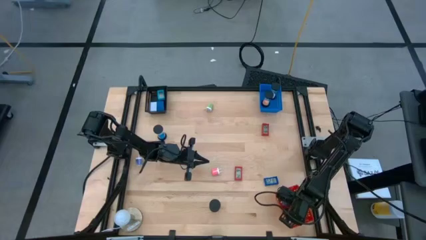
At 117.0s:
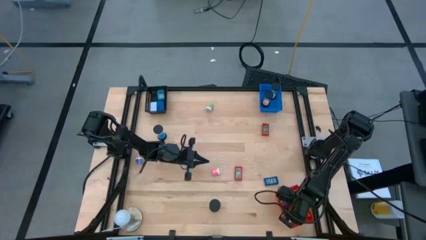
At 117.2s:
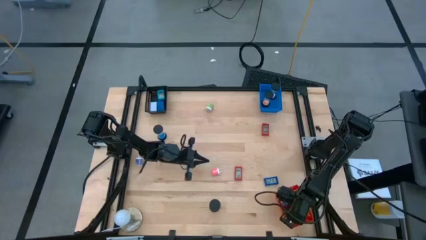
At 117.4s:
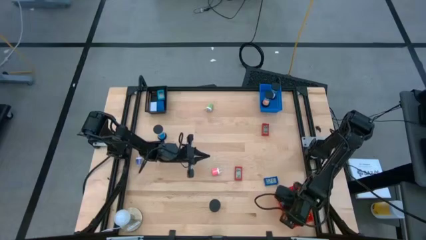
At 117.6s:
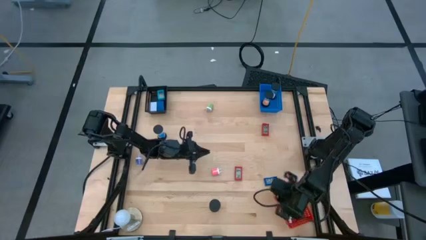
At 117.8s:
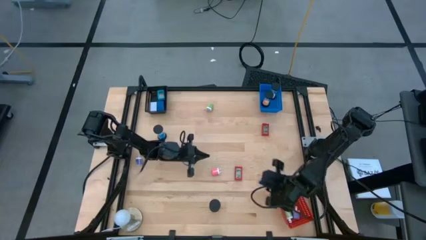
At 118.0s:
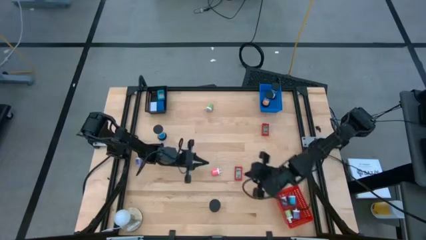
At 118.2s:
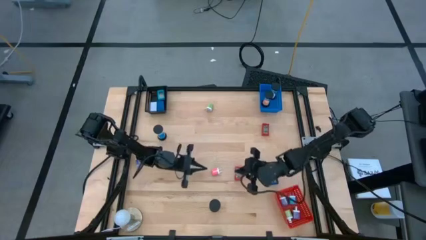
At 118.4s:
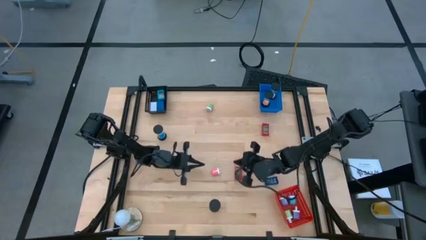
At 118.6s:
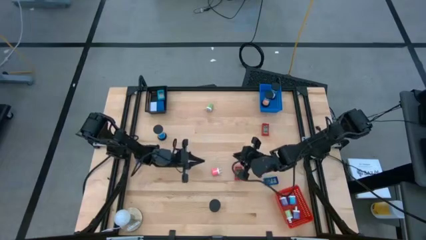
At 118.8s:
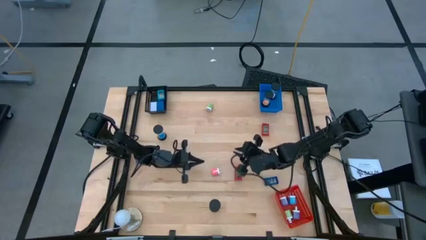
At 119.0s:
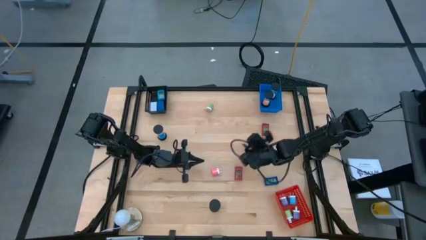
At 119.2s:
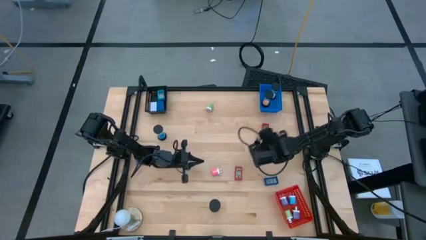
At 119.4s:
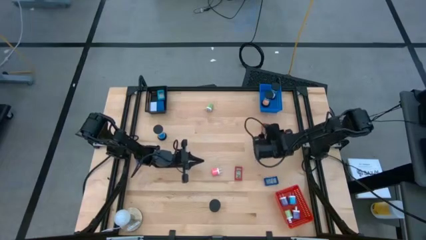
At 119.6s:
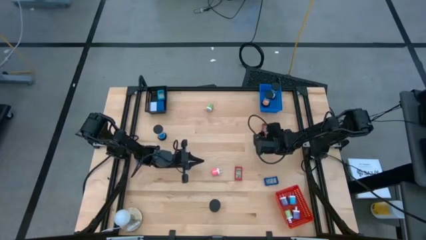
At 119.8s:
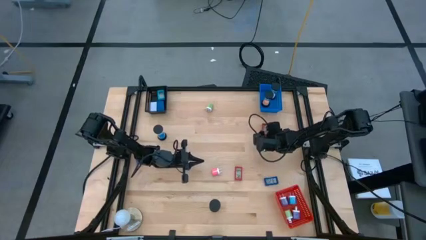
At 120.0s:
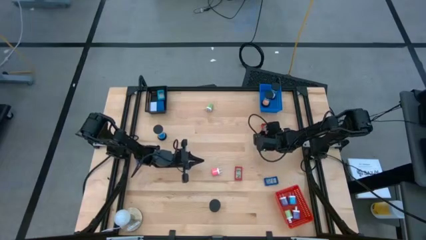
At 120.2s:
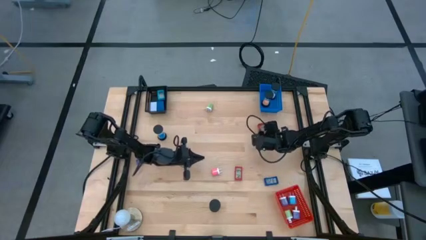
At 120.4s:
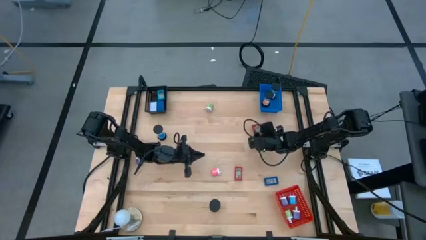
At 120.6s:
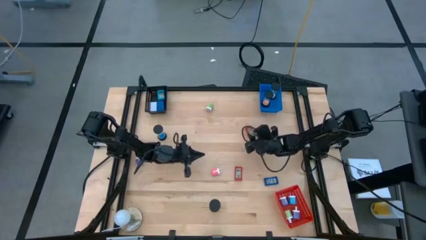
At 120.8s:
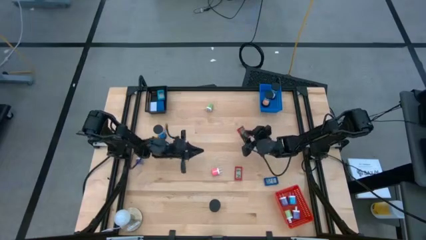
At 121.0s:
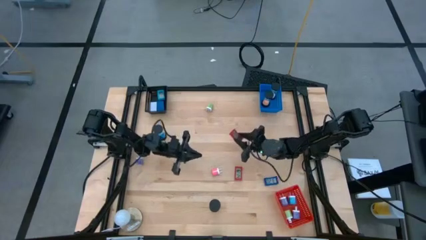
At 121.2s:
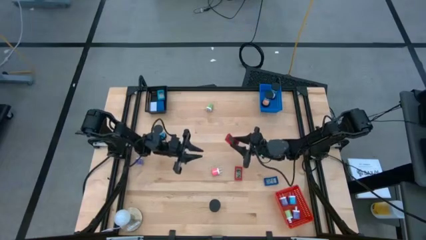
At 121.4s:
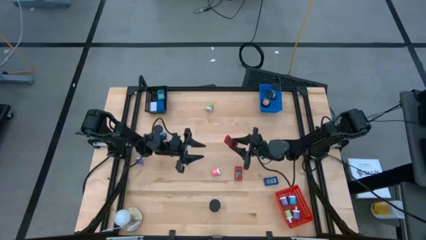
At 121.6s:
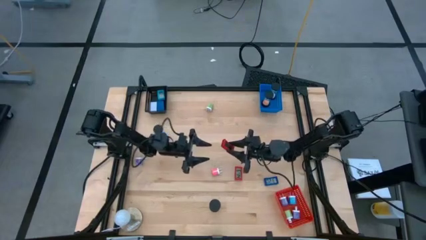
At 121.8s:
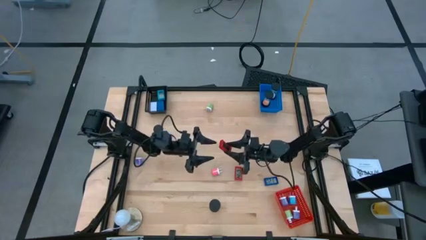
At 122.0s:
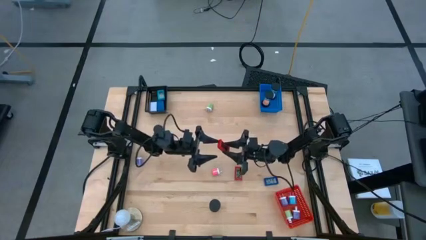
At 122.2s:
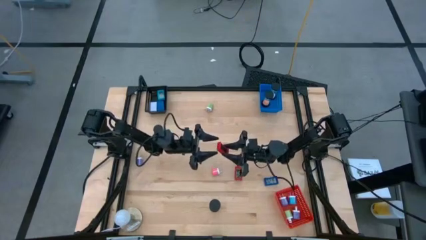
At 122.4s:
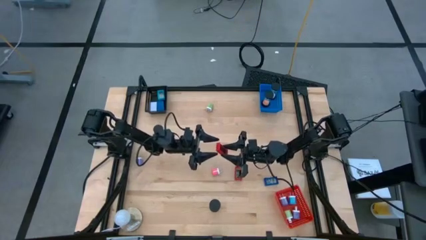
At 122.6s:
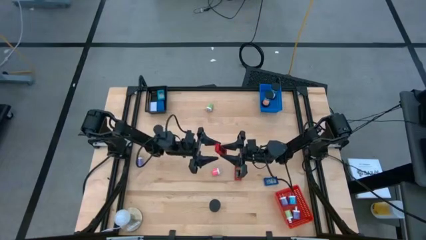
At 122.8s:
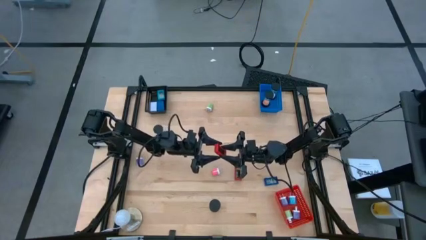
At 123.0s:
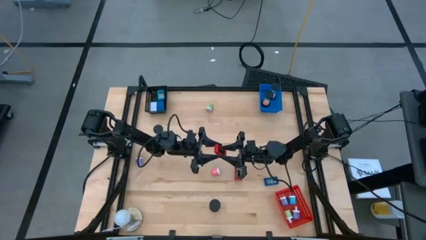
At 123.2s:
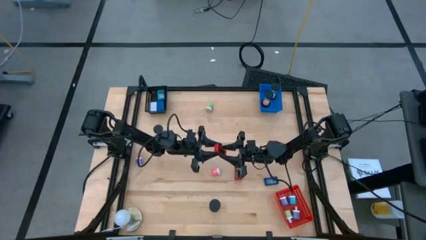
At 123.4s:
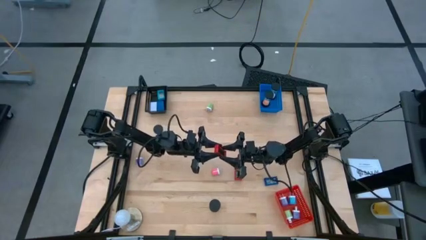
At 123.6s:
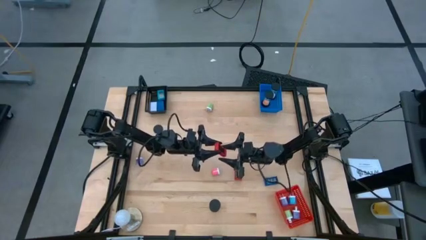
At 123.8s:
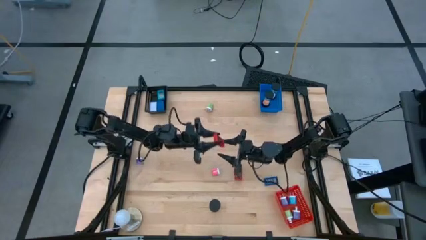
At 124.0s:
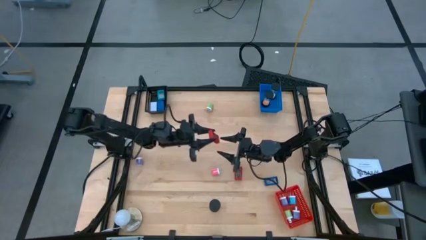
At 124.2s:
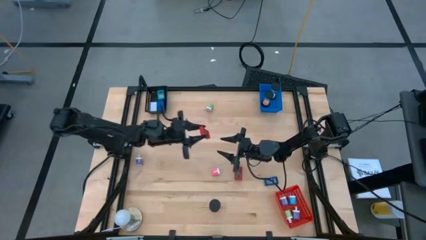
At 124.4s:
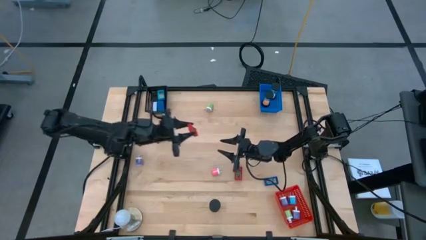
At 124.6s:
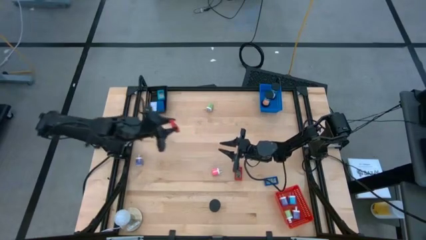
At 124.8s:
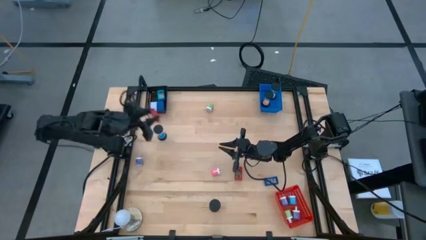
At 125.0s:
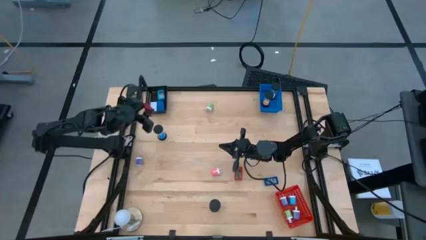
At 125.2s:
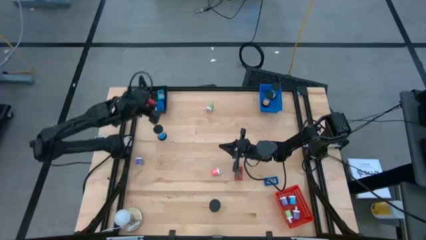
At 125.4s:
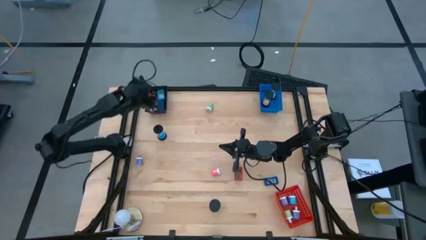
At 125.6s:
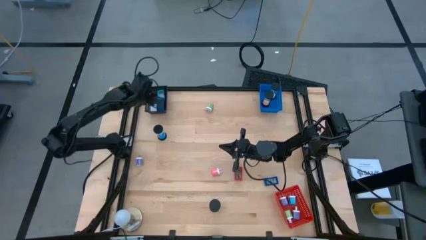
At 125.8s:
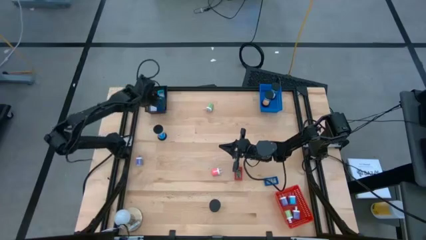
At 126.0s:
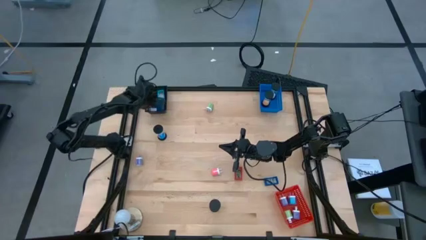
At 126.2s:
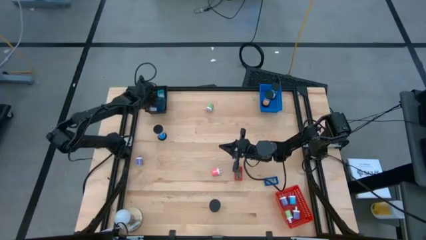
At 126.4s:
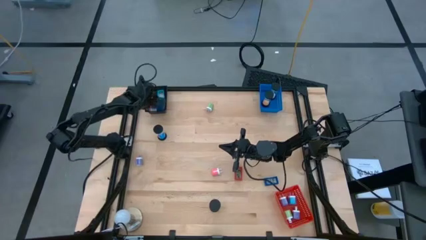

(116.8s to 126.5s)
Task: Pick & Place Office items
Put the top red digital timer into the black basket

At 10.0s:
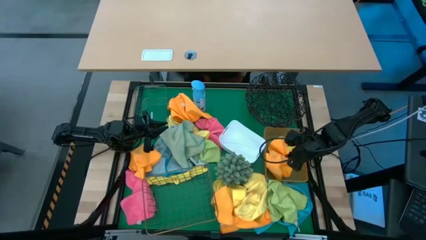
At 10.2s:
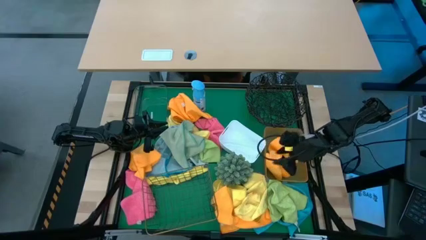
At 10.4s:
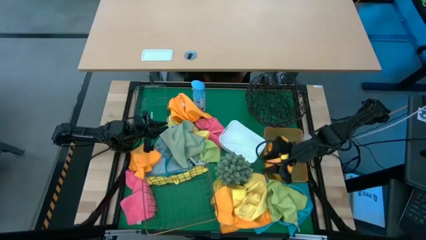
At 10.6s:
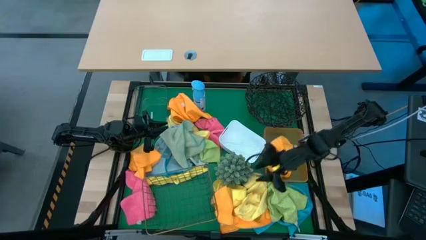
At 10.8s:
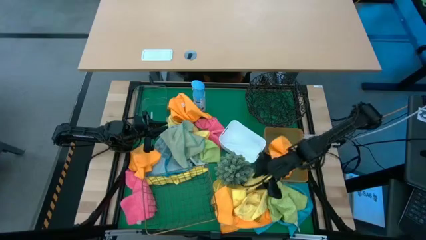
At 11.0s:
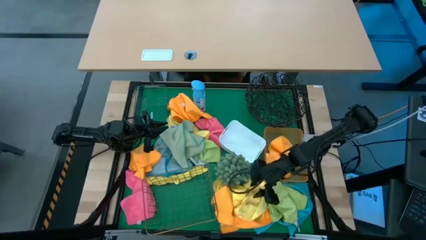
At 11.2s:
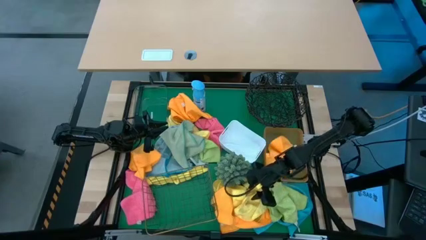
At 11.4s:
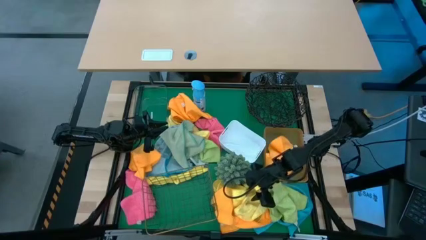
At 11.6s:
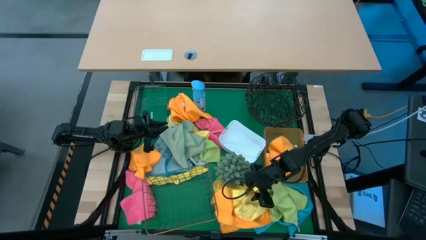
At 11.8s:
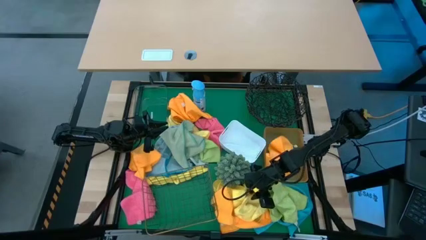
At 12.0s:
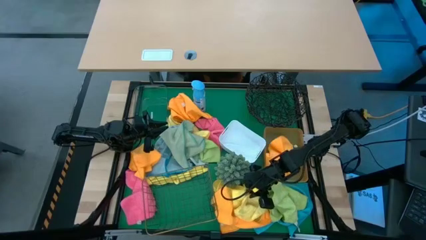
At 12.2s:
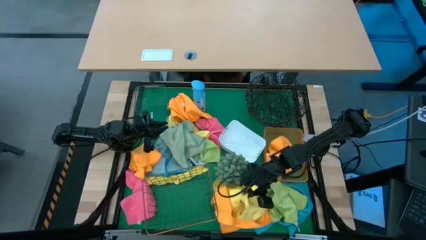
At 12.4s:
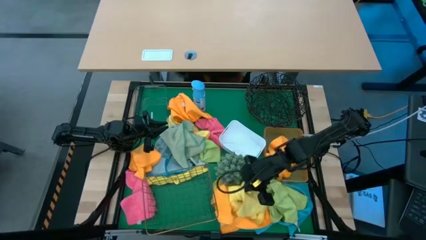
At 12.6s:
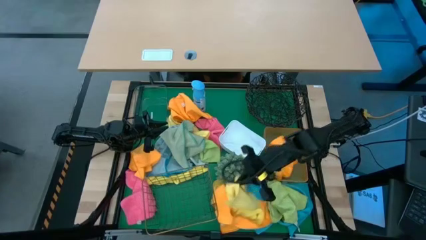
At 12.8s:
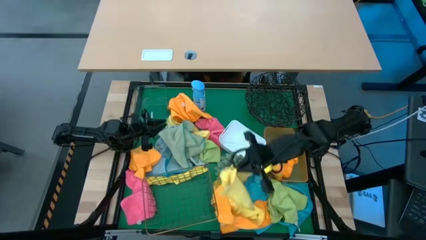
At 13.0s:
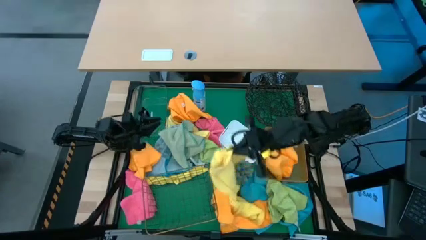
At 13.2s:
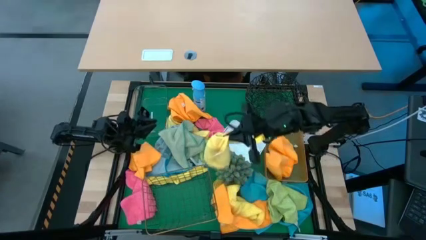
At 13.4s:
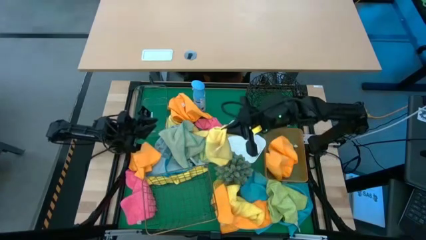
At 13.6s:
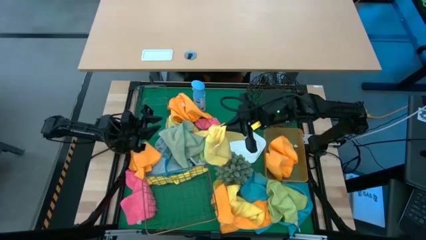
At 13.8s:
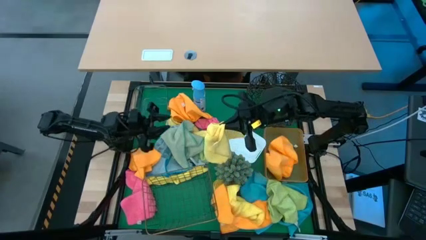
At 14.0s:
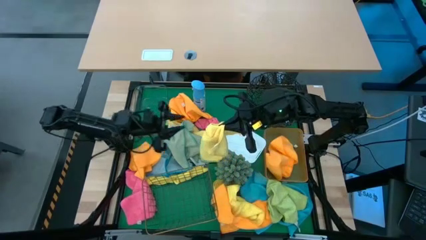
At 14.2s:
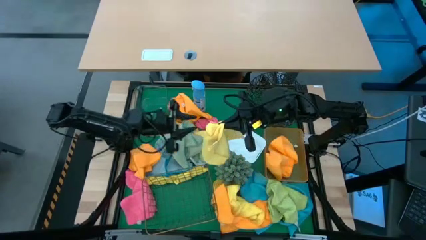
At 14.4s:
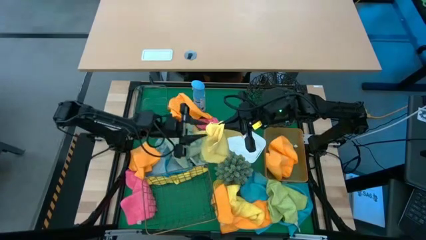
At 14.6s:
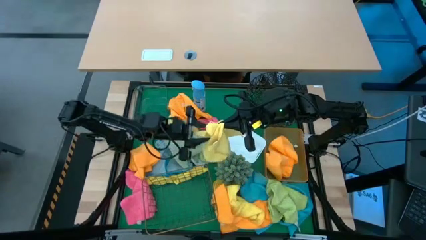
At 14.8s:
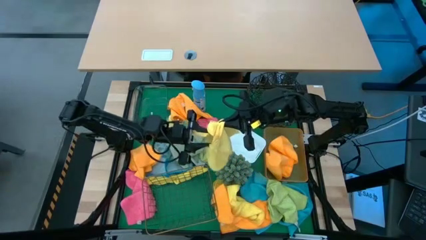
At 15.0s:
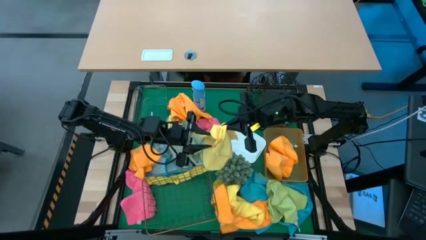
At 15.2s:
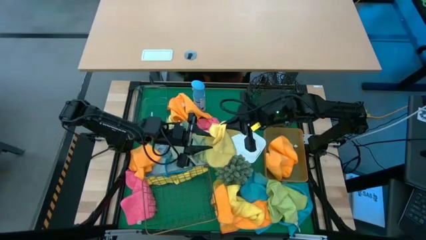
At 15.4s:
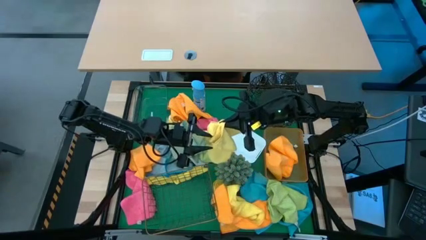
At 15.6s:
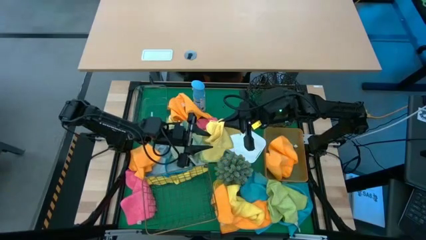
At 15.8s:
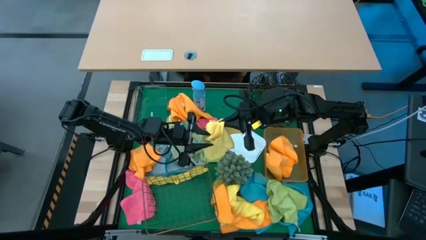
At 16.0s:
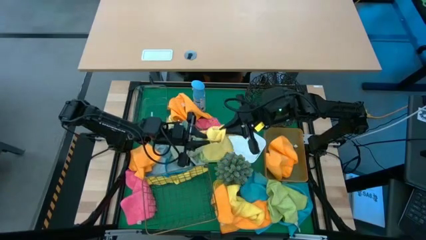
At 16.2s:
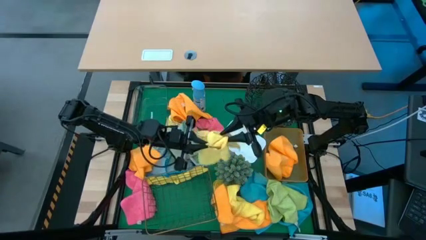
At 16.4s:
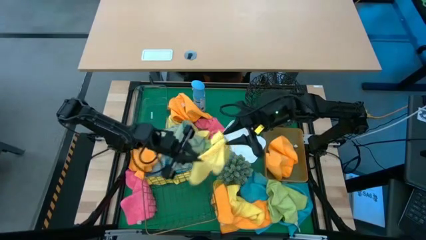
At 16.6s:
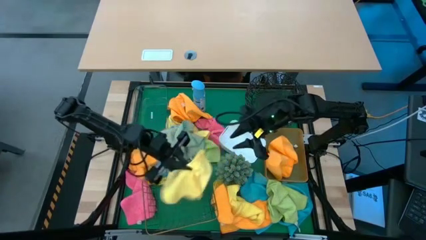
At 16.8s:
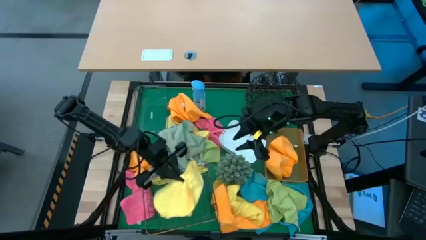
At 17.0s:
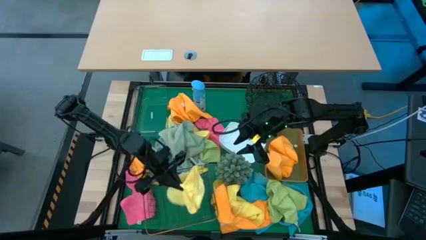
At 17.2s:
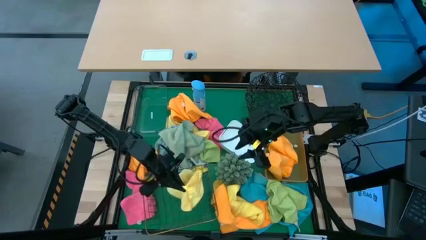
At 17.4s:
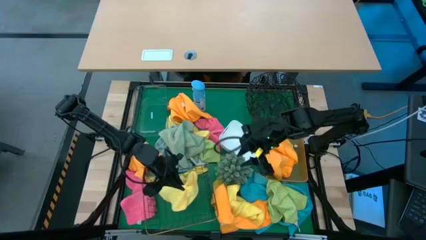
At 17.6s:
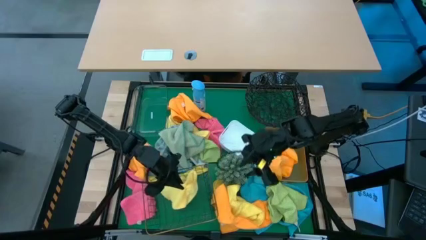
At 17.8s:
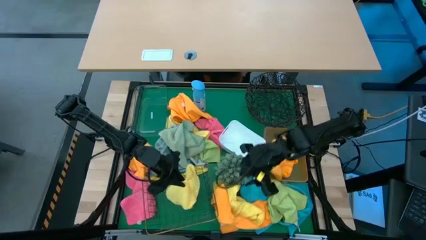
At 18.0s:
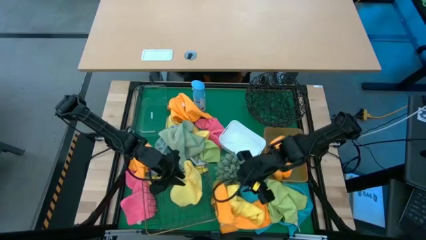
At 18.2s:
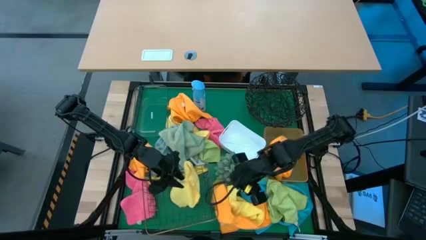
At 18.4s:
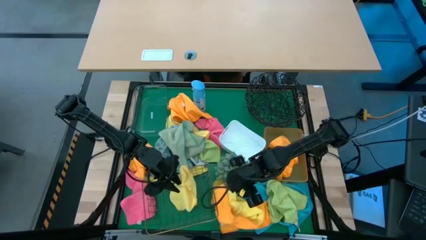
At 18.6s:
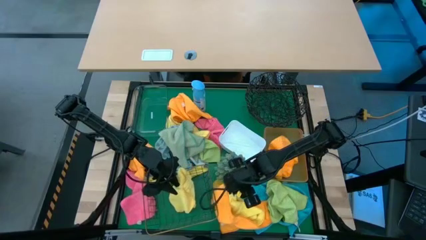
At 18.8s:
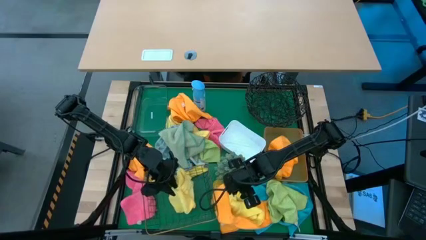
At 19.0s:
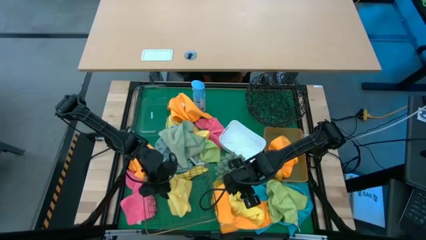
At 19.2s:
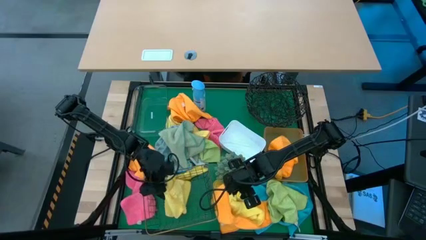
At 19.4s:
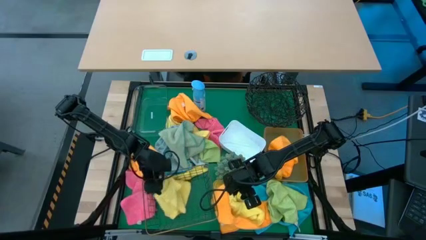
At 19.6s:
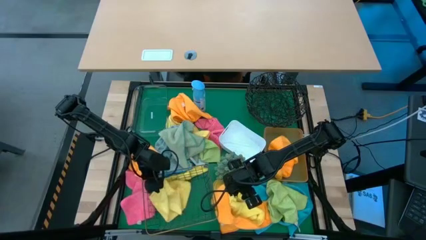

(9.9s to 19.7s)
Task: Sort microfiber towel by color & place in baskets
Put the yellow microfiber cloth into the gold wire basket
